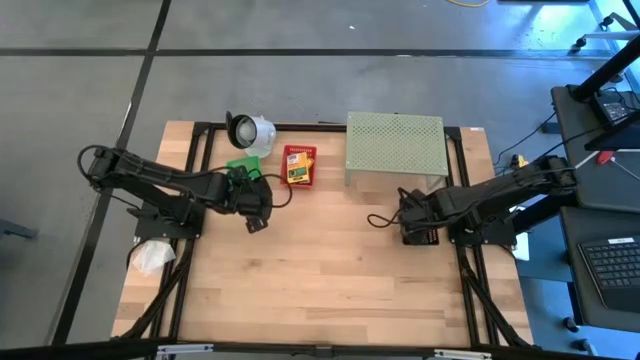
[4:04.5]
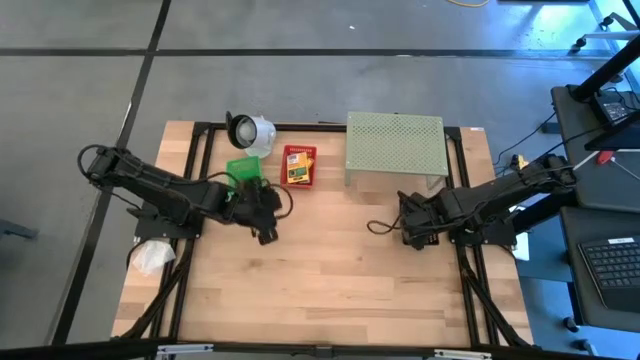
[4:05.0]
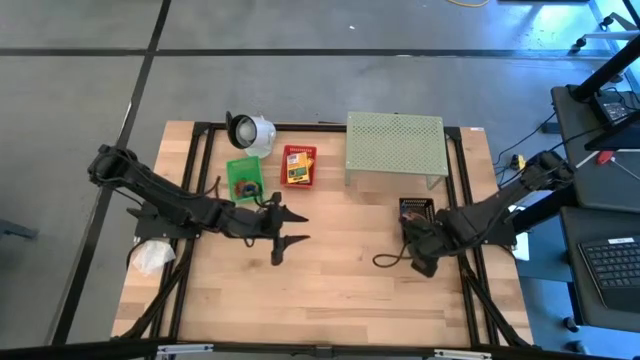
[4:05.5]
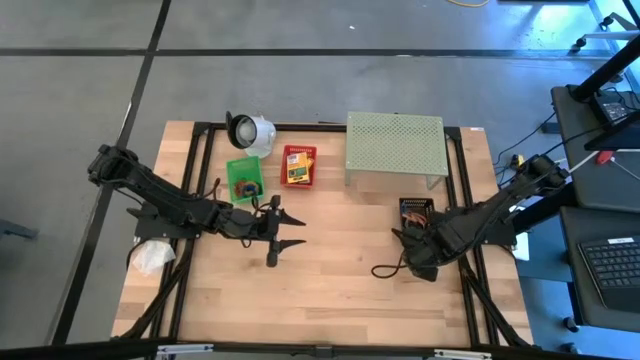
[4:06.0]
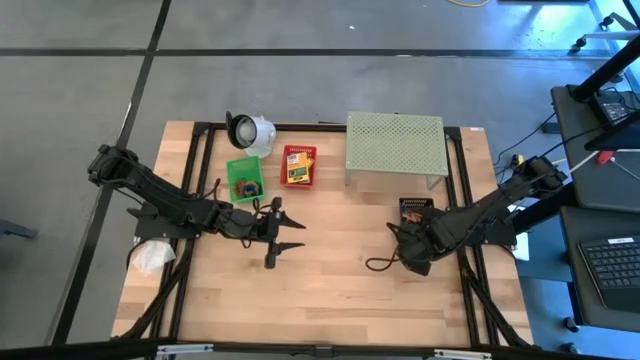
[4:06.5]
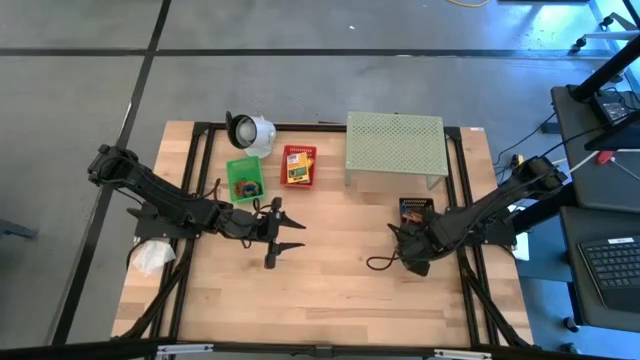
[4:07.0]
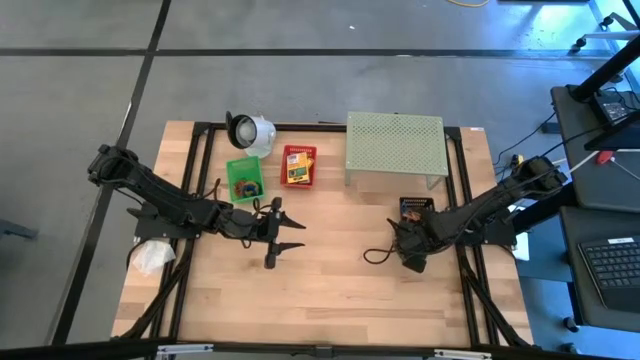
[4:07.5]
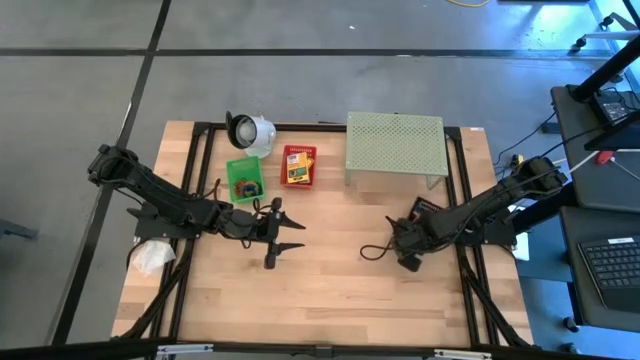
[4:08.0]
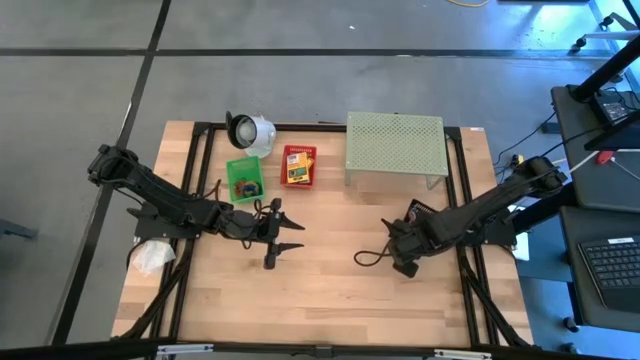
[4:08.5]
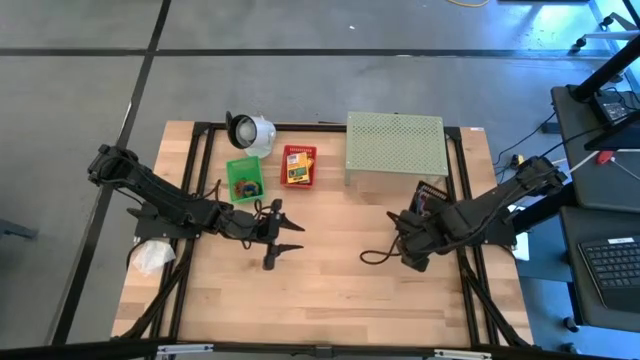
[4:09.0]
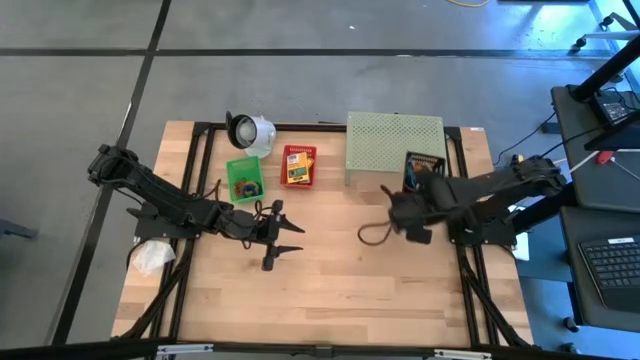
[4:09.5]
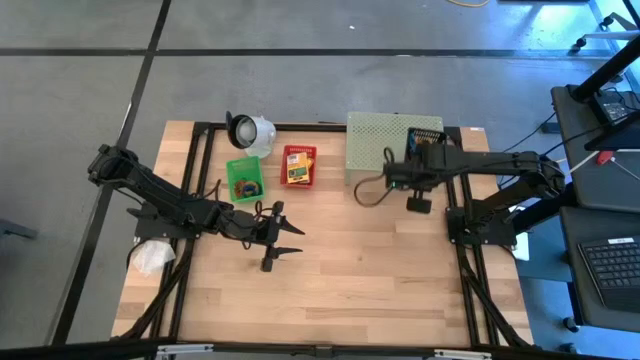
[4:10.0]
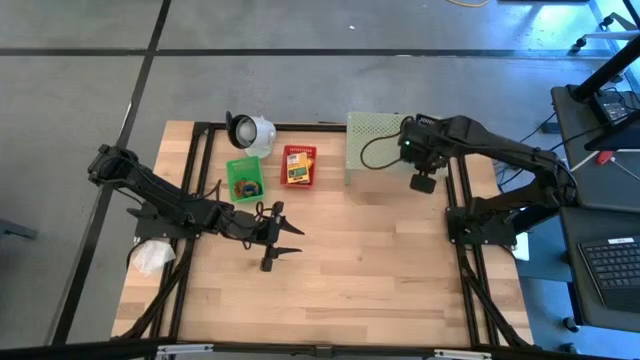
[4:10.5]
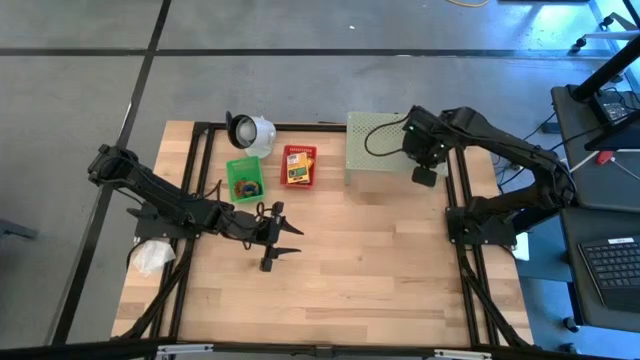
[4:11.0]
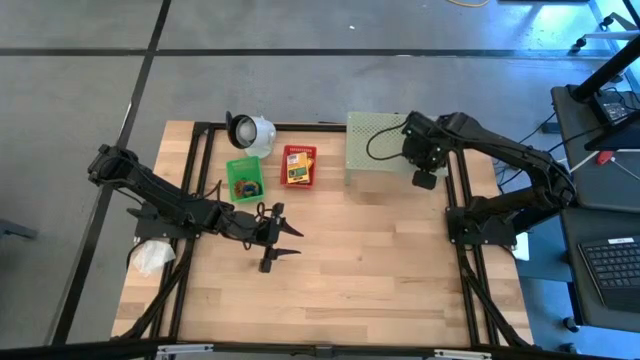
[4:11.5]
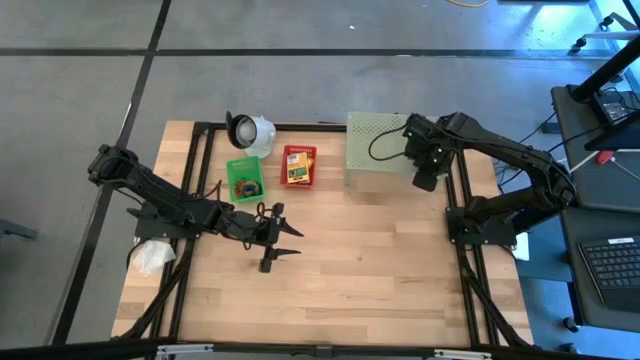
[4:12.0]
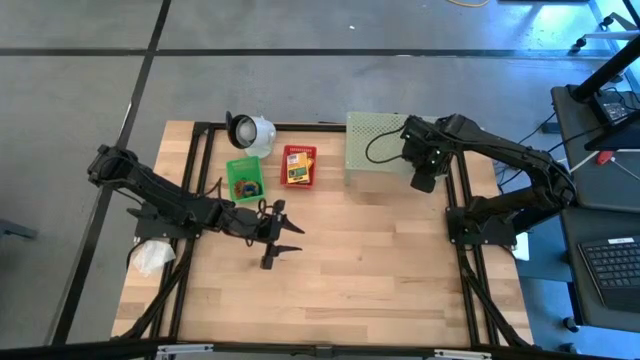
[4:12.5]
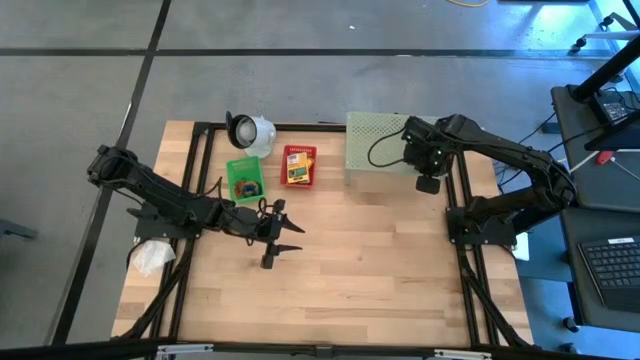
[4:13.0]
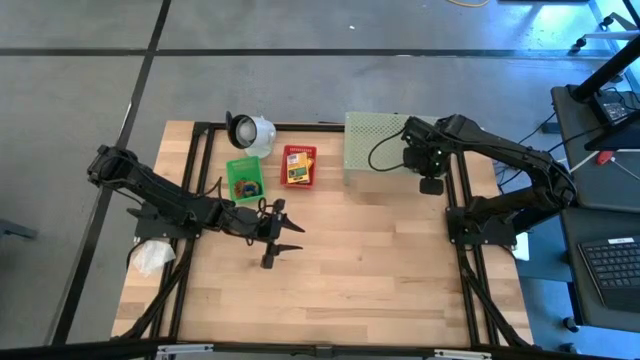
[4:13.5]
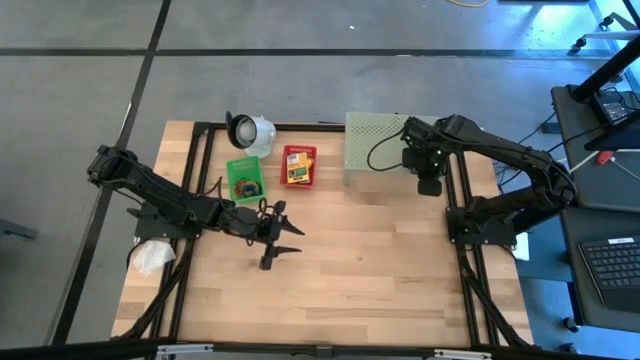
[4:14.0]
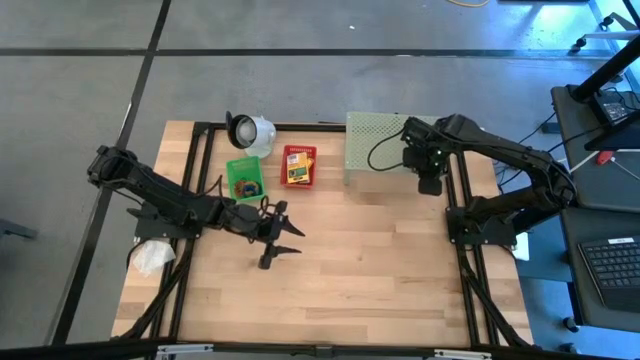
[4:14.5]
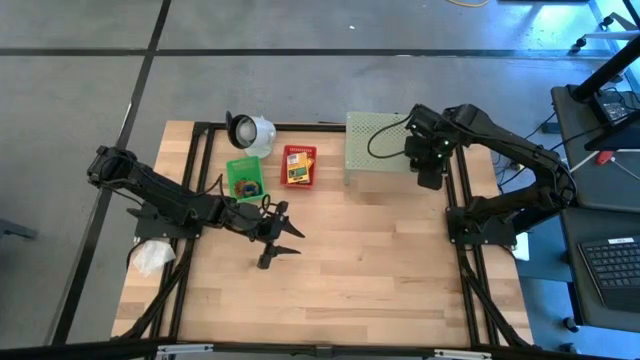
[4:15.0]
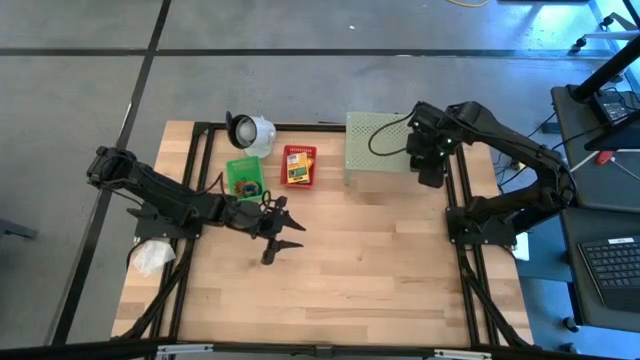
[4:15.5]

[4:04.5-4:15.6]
Task: Pick & Place Office Desk Supplies
Put the black basket on the shelf

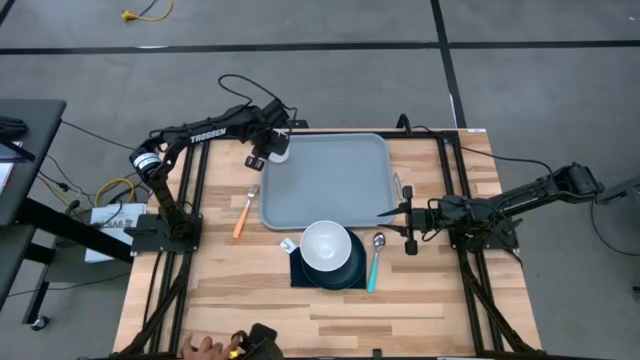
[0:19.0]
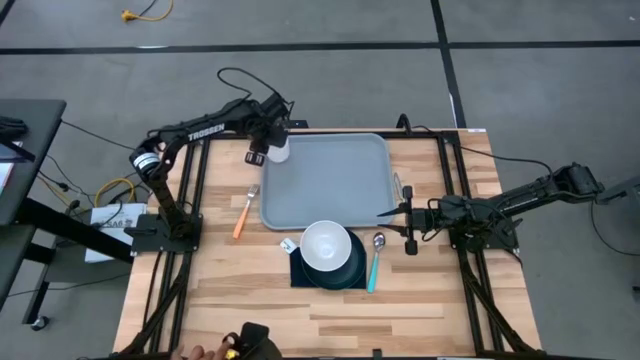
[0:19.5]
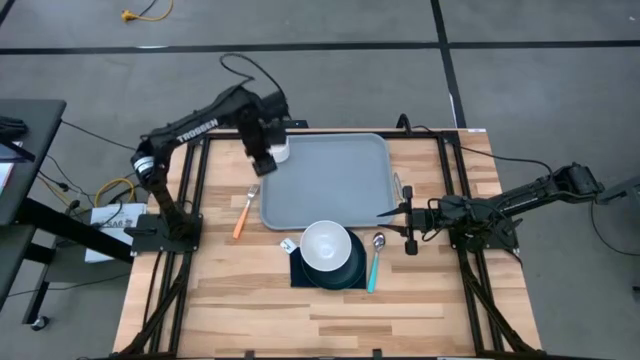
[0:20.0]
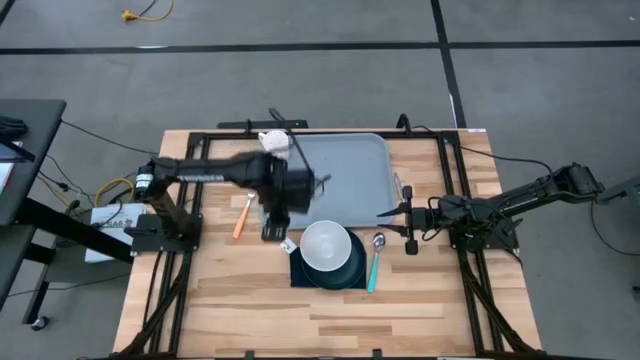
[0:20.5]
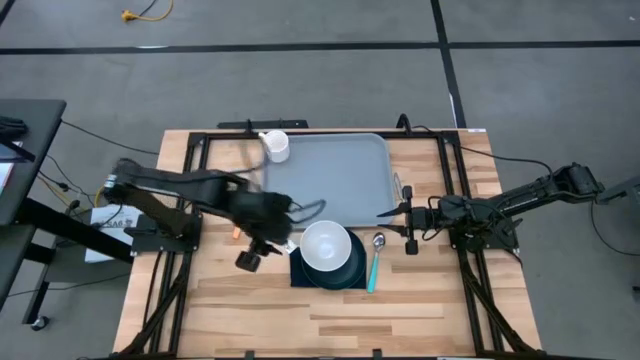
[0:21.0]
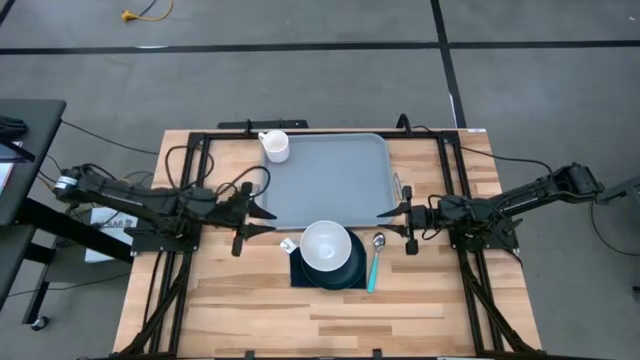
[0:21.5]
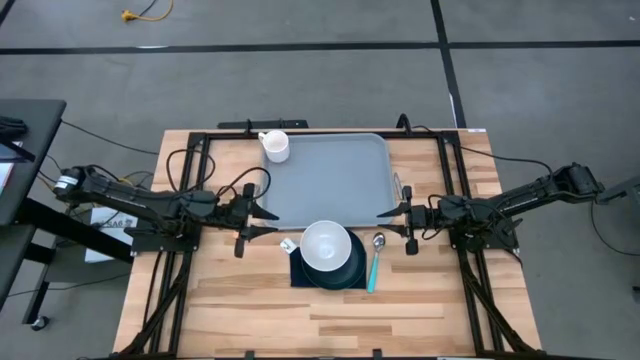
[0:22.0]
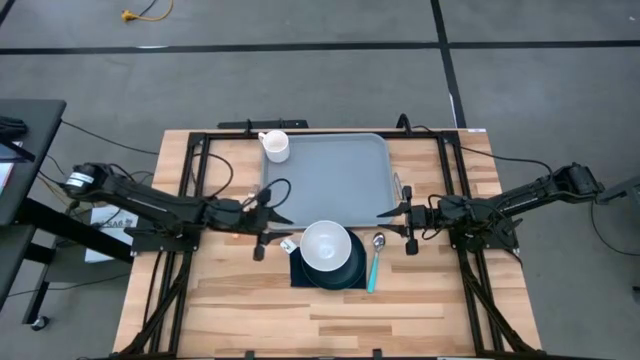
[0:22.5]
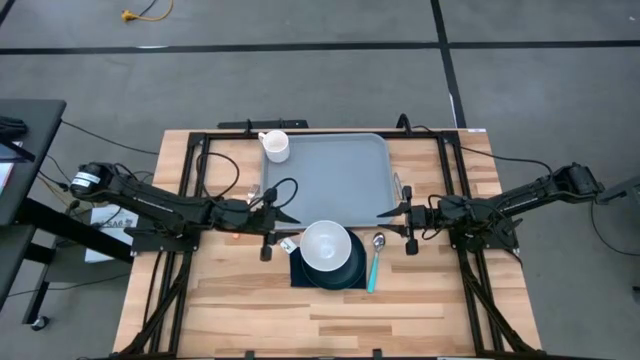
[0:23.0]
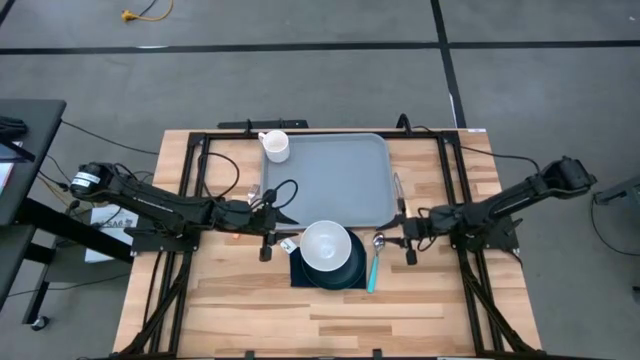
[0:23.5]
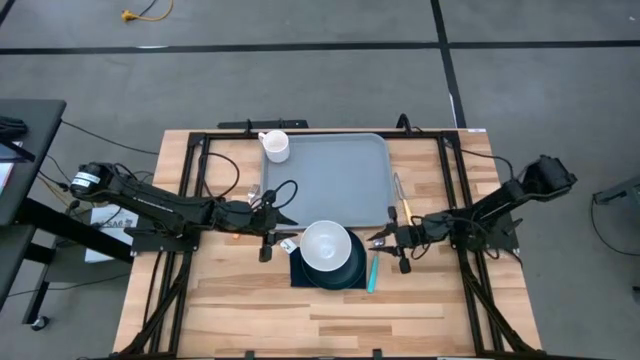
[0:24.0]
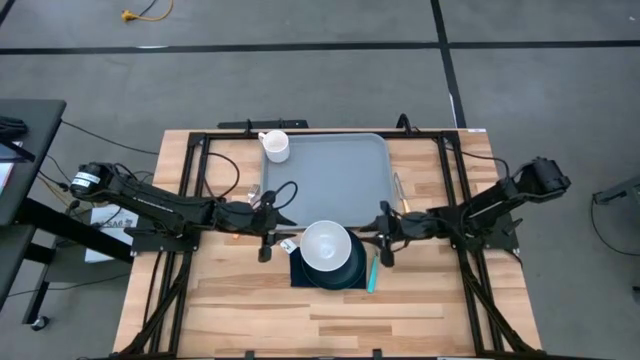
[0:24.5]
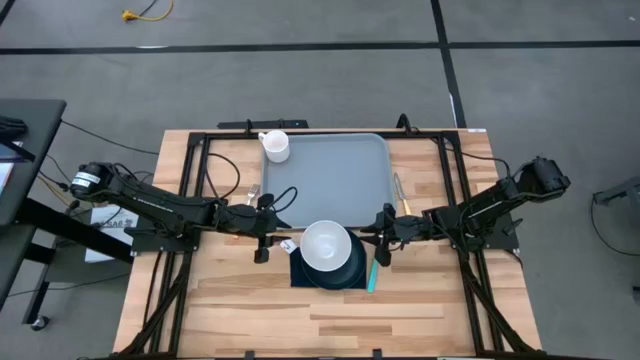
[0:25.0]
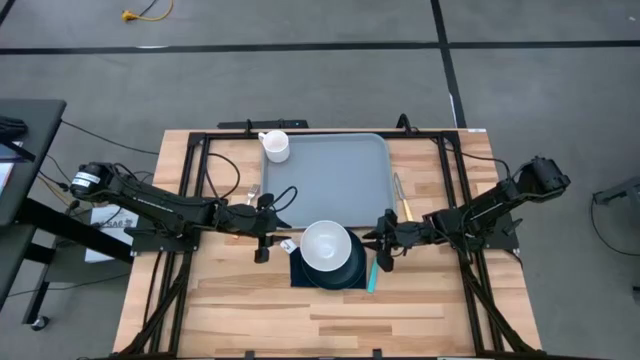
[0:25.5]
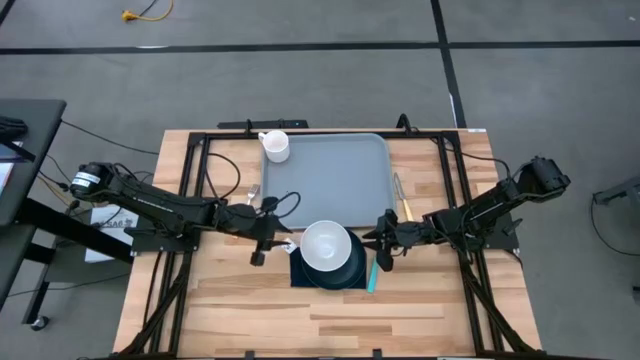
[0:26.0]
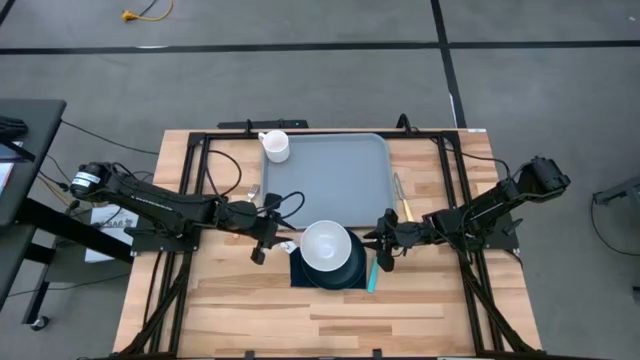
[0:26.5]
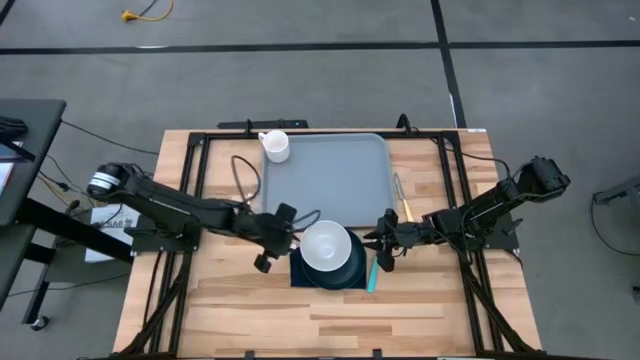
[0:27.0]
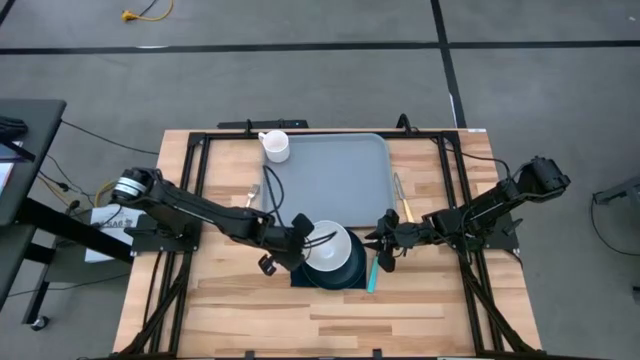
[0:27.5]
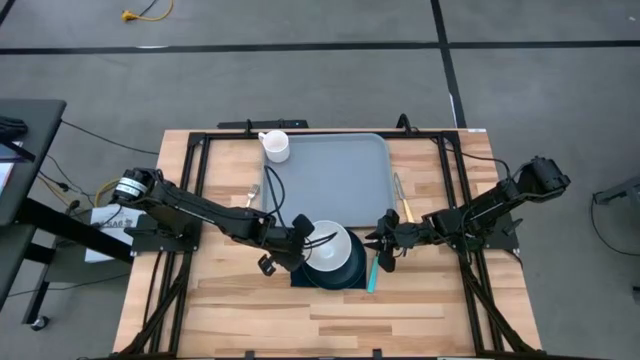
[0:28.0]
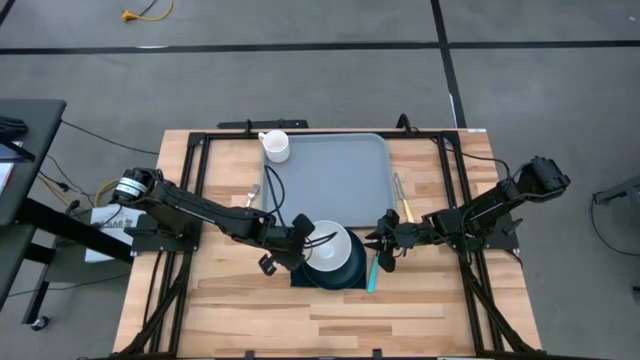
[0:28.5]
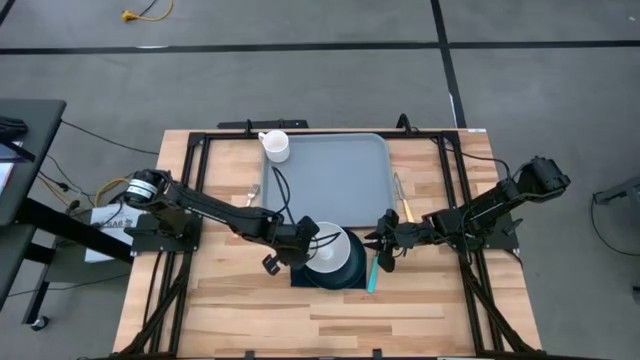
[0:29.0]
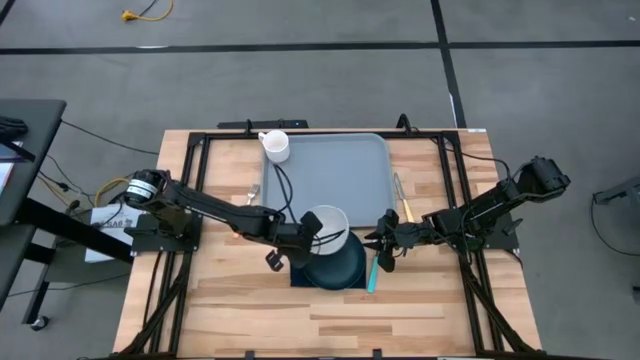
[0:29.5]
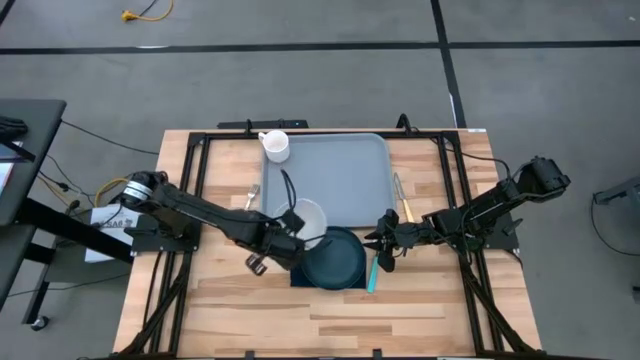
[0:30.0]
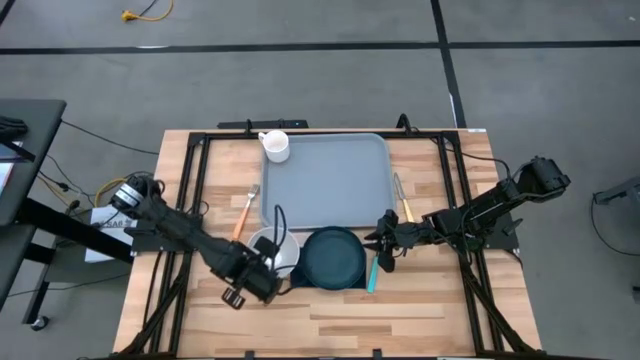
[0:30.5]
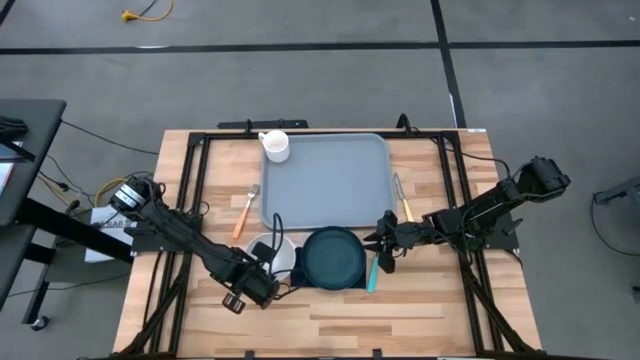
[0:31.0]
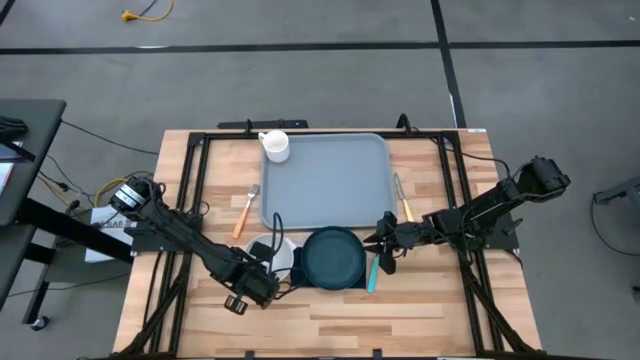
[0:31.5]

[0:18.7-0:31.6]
Task: Set up tray
Remove the white bowl from the green plate
